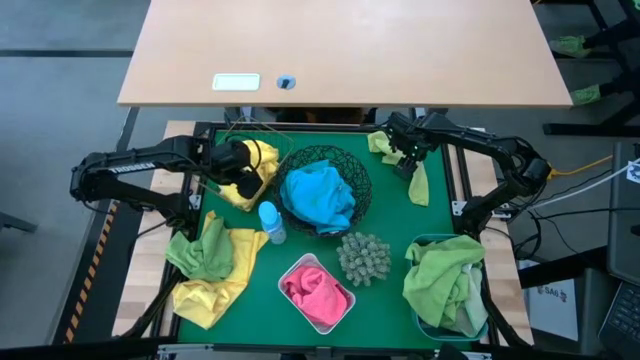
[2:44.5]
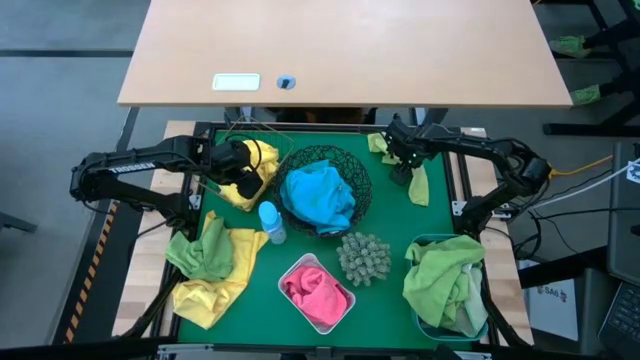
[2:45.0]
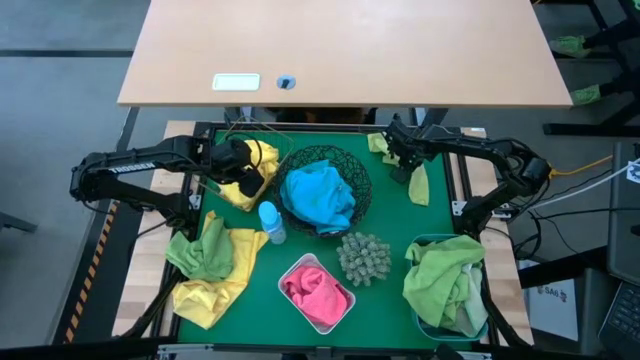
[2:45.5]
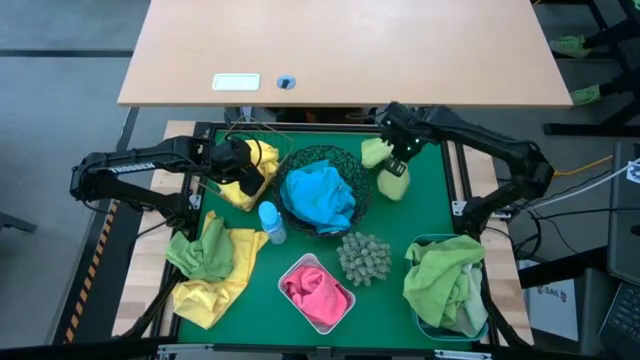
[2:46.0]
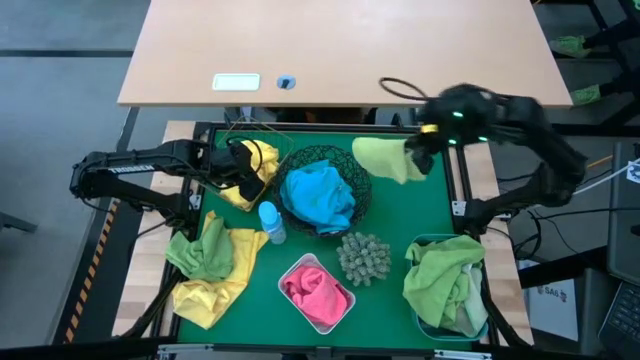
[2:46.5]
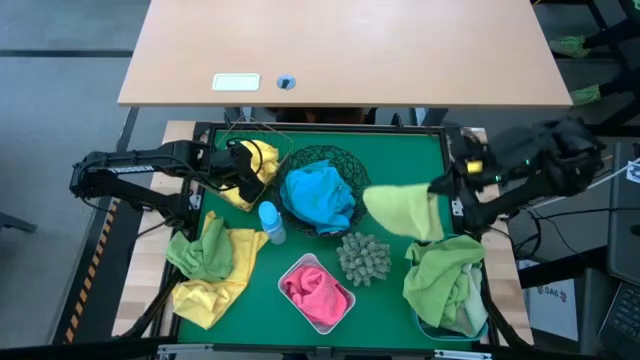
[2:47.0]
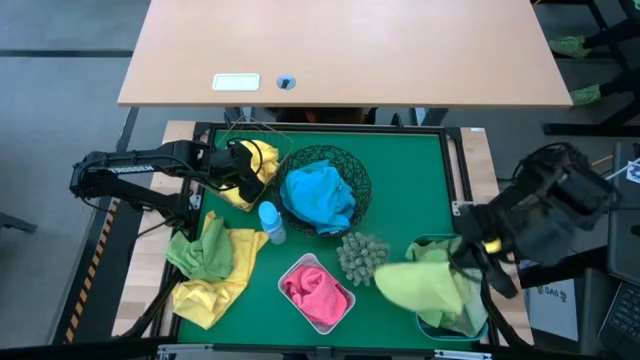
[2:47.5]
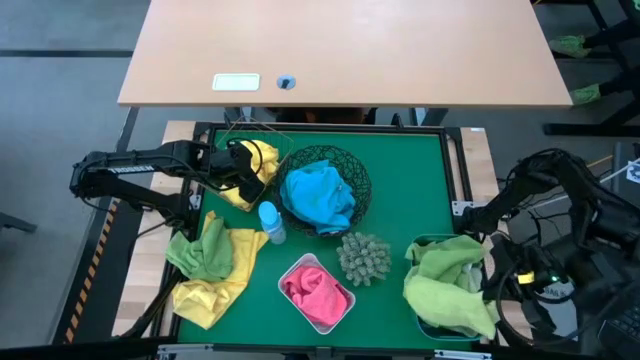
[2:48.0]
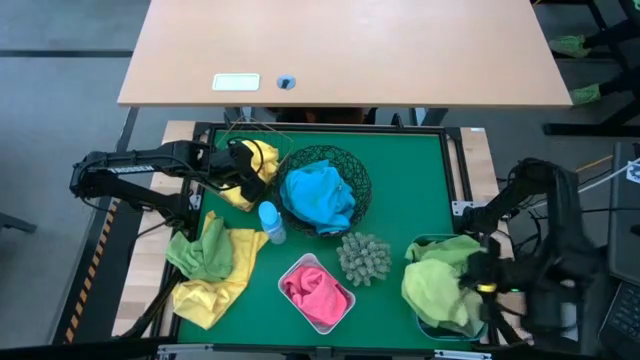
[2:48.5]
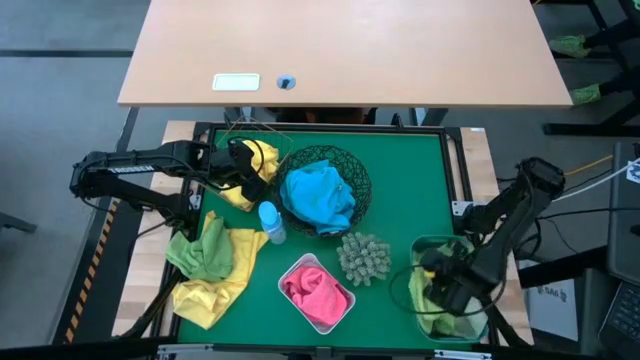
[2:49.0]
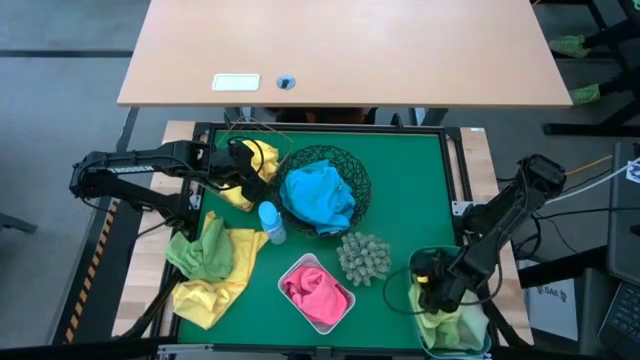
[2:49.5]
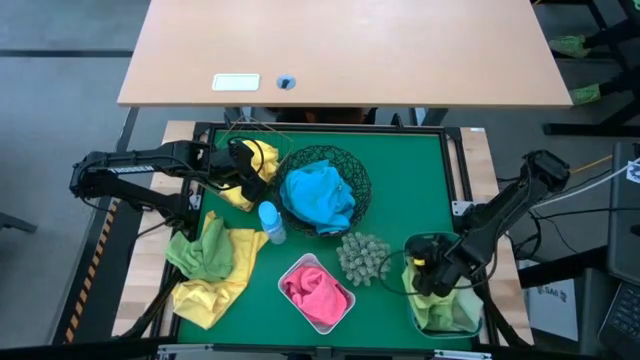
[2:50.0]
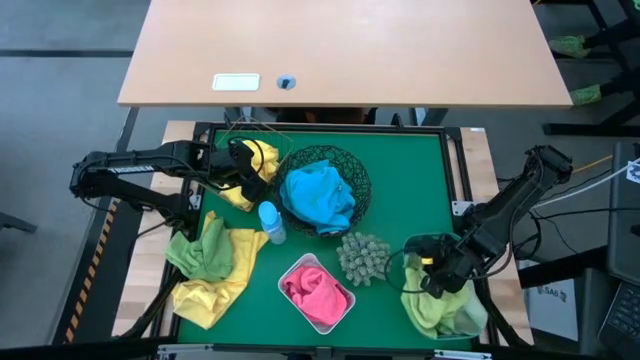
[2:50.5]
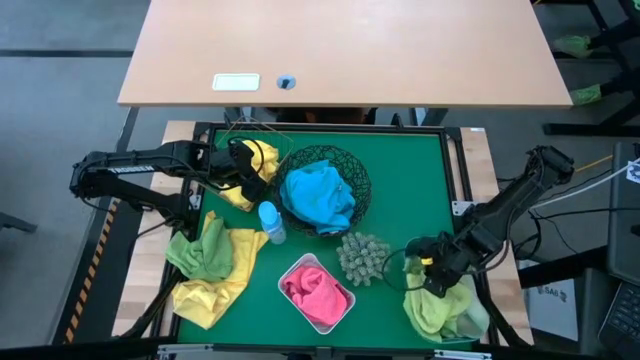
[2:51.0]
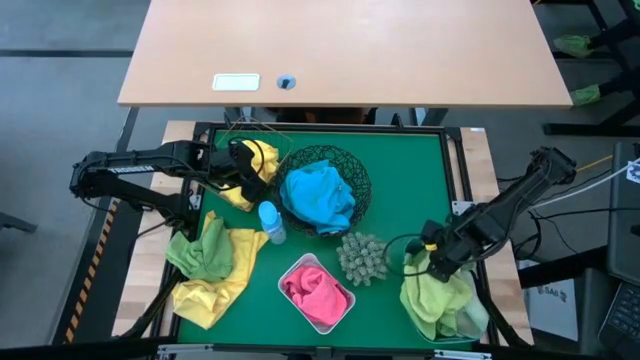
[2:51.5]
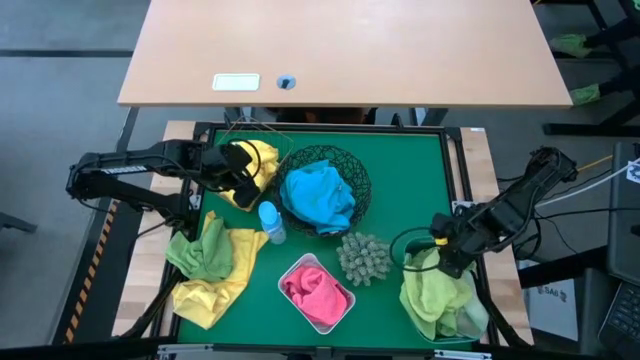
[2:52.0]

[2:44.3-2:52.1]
Task: Sort microfiber towel by color & place in baskets
Put the green microfiber cloth into the blue bin

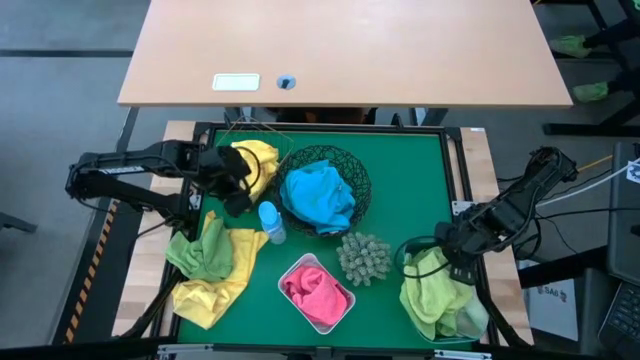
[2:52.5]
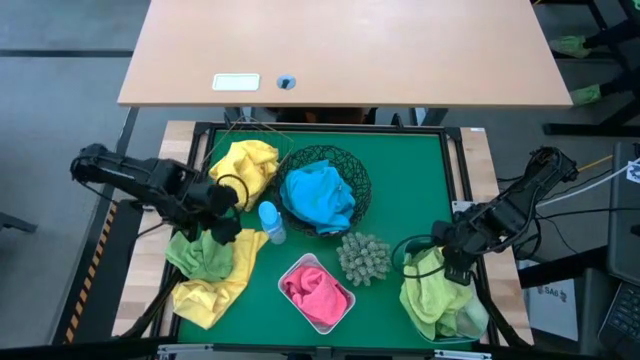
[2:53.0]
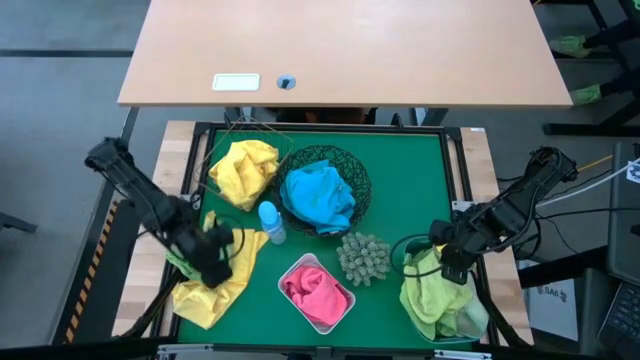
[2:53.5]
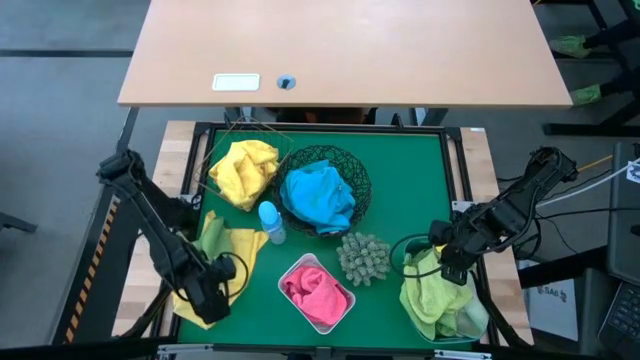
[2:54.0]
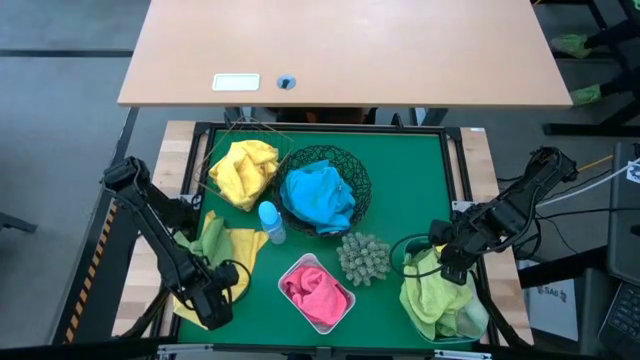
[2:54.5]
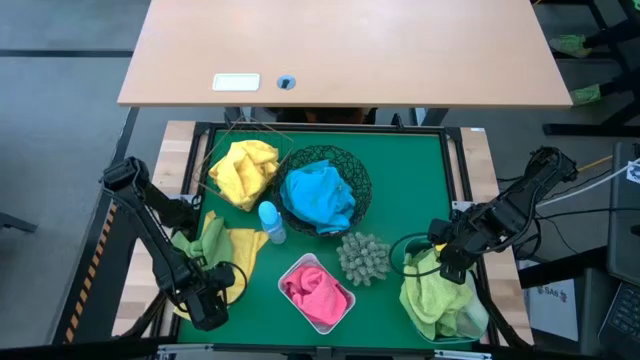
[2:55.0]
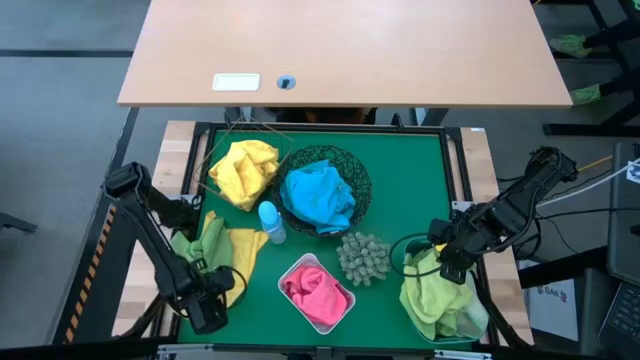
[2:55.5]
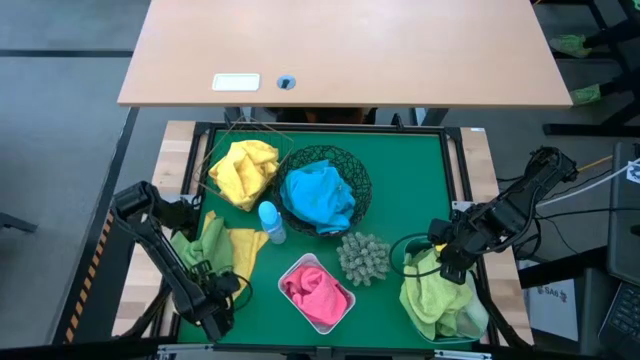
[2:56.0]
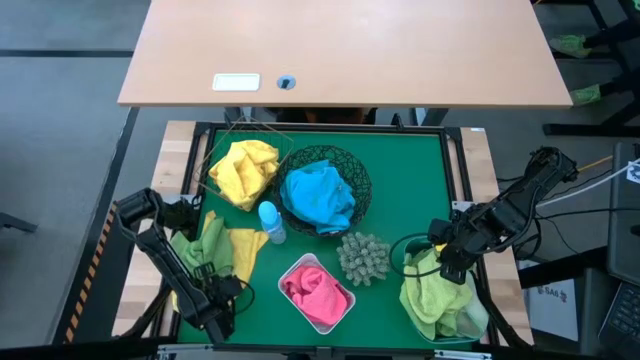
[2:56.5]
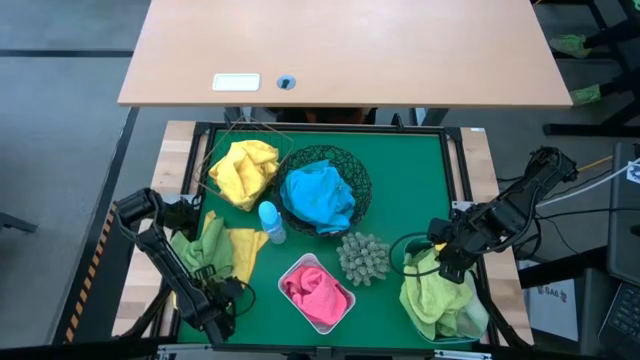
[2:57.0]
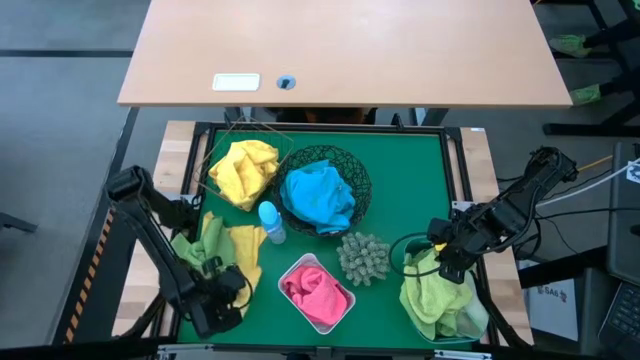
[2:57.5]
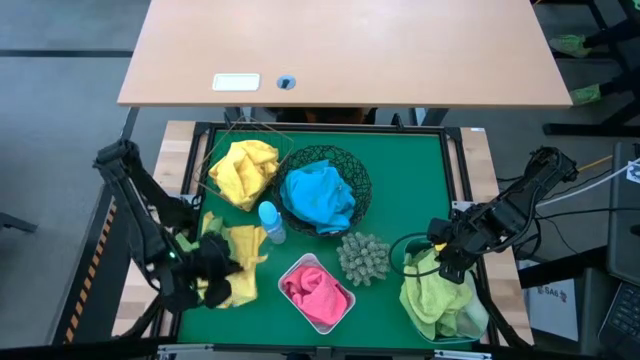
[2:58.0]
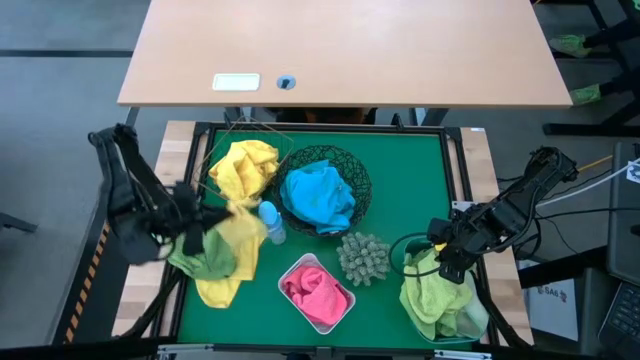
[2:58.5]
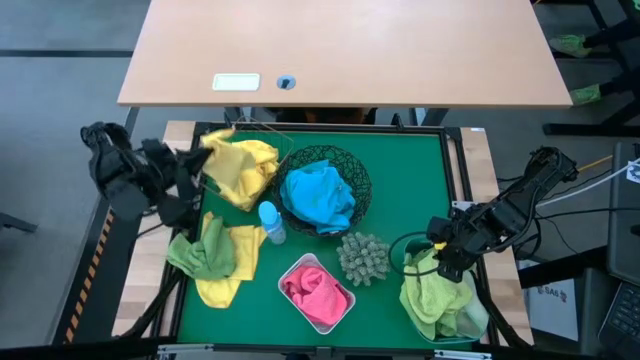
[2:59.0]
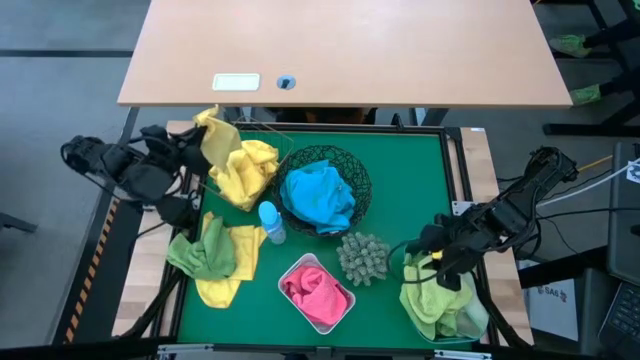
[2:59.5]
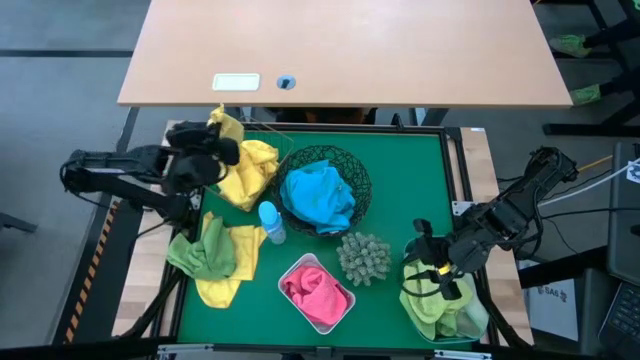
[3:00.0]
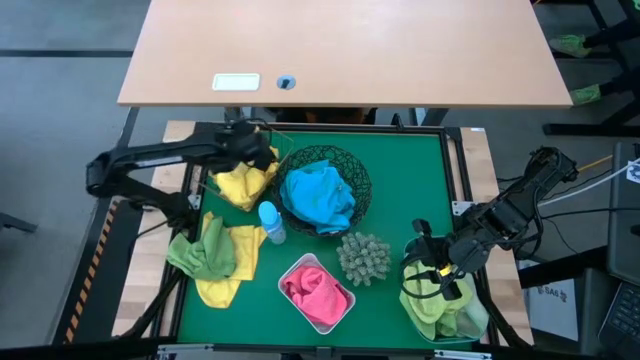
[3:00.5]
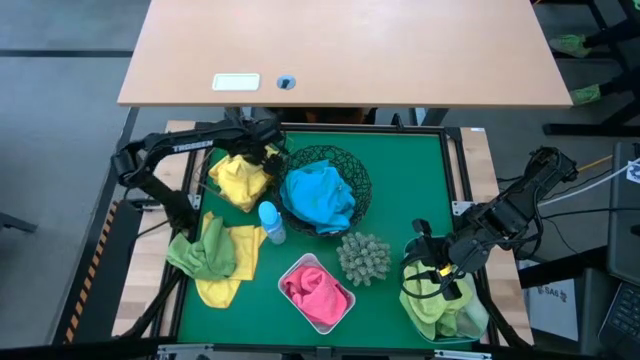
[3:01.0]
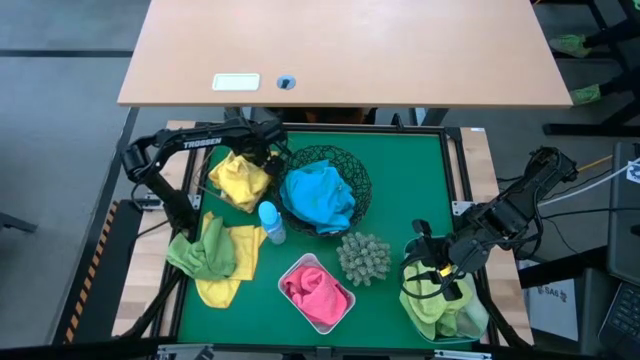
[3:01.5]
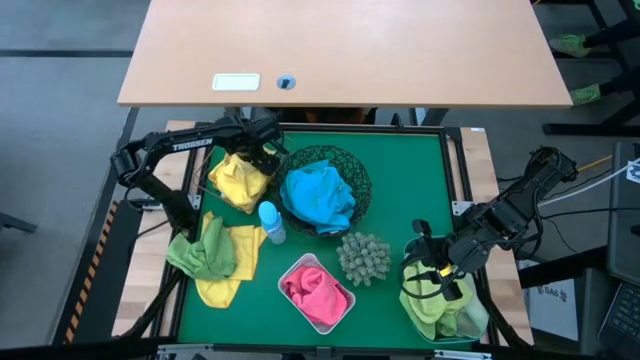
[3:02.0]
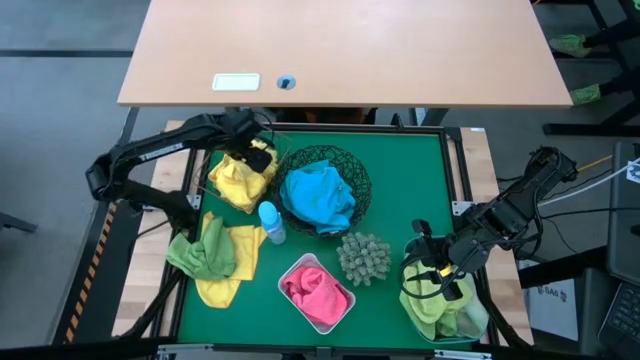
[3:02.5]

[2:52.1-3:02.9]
Put the yellow microfiber cloth into the rectangular wire basket

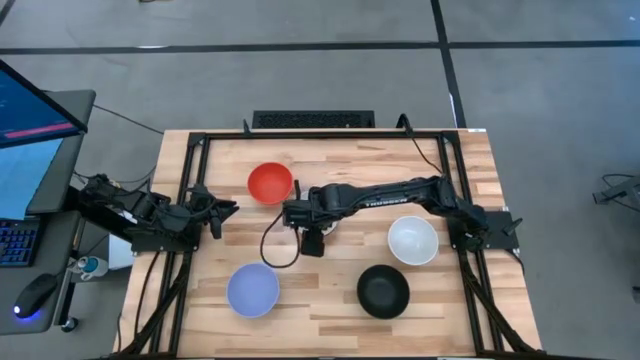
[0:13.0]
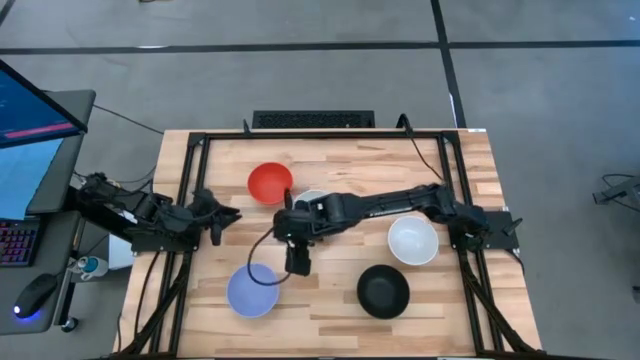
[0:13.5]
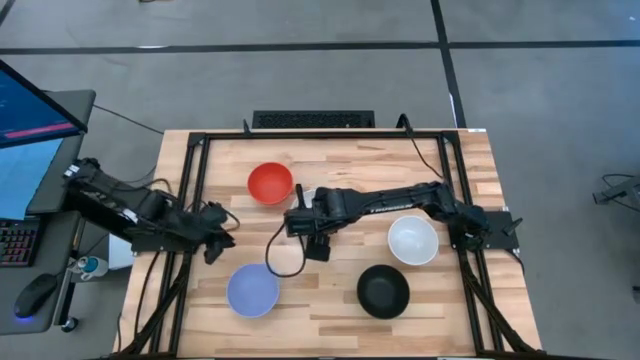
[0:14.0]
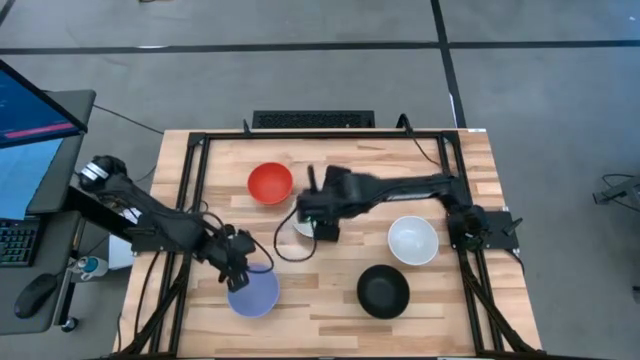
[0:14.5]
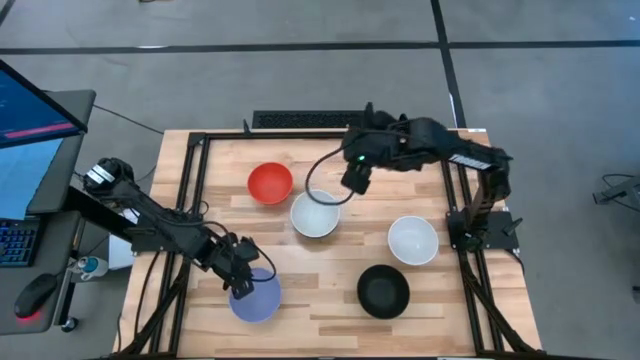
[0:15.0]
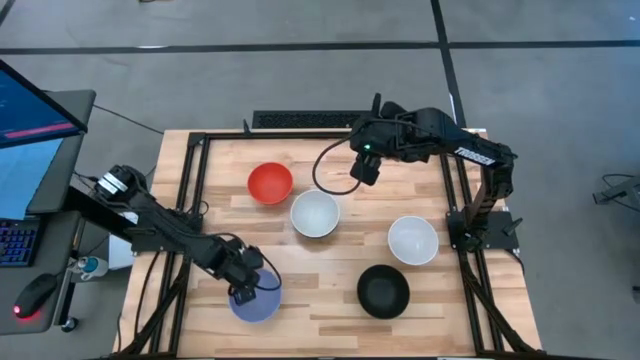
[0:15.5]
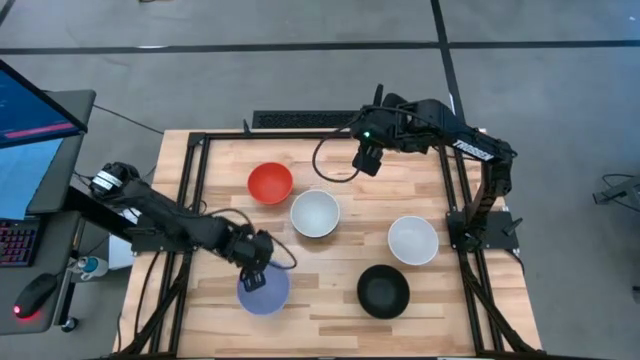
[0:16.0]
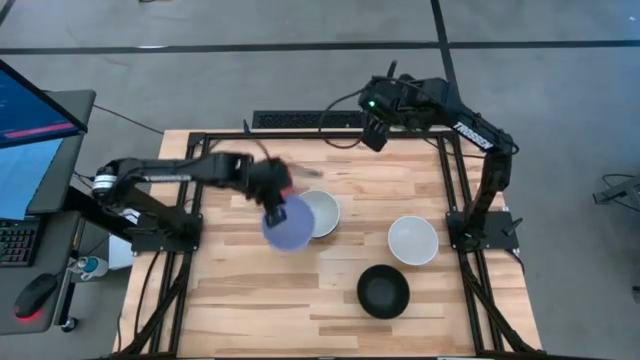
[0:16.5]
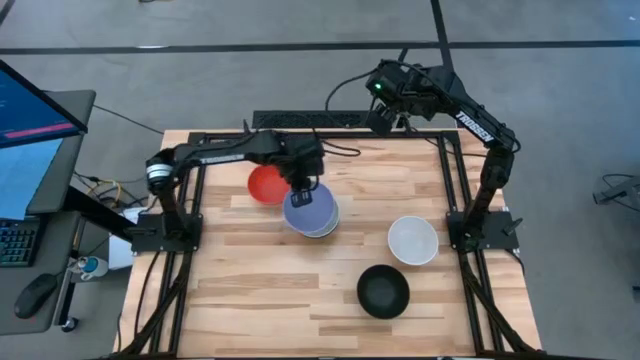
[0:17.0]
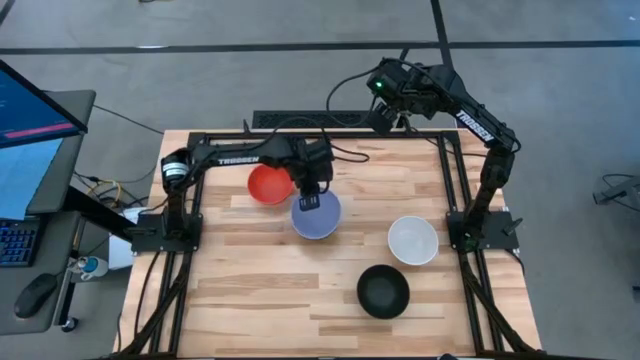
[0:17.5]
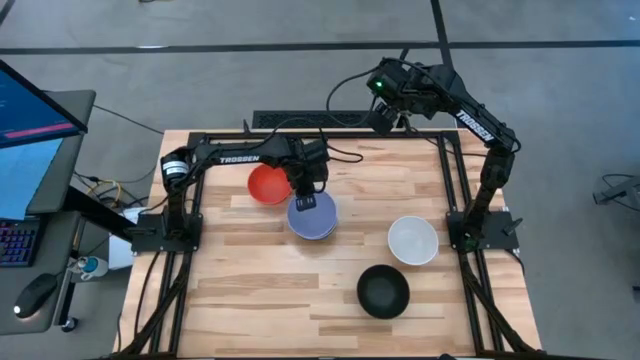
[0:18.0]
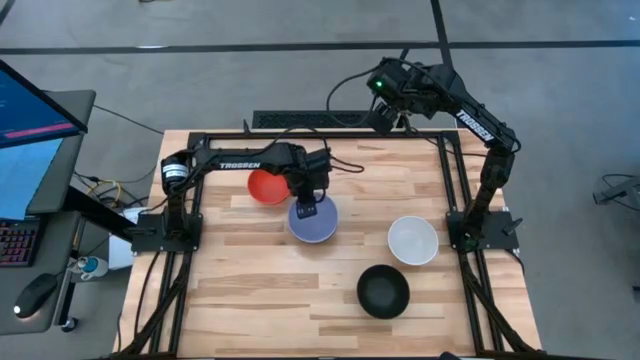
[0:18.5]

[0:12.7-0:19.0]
Task: Nest bowls inside each other
Stack the purple bowl on the left white bowl
